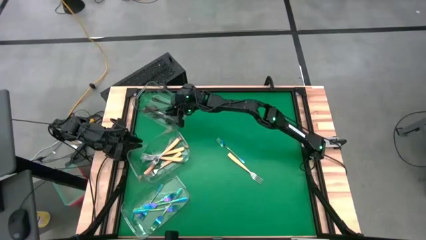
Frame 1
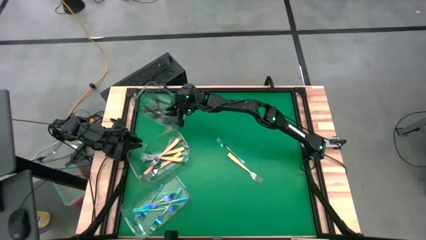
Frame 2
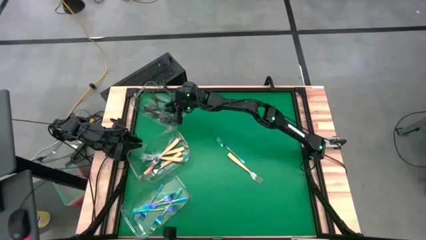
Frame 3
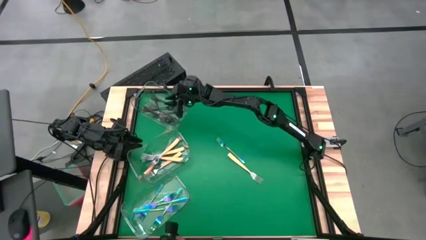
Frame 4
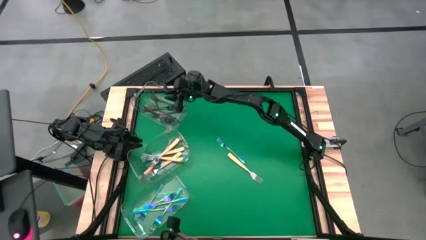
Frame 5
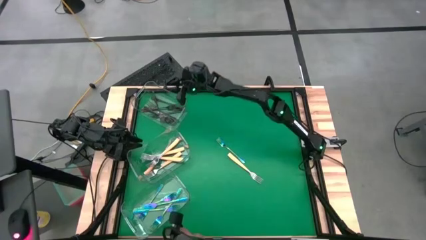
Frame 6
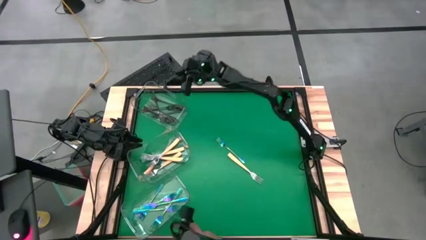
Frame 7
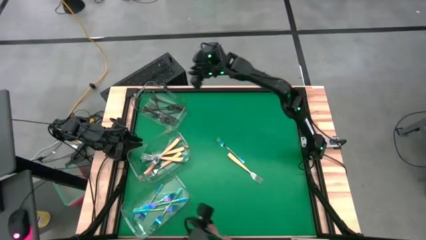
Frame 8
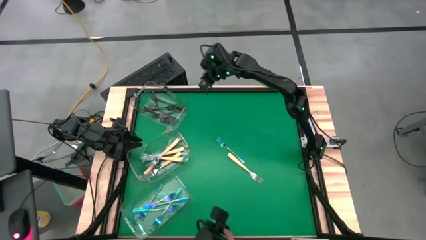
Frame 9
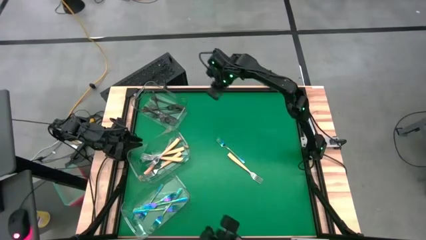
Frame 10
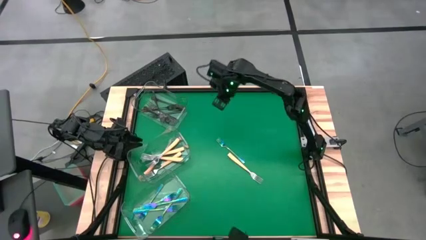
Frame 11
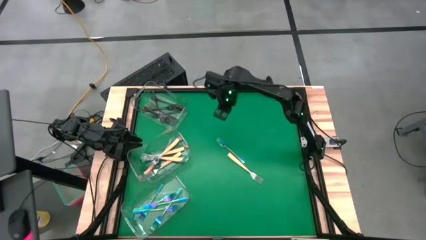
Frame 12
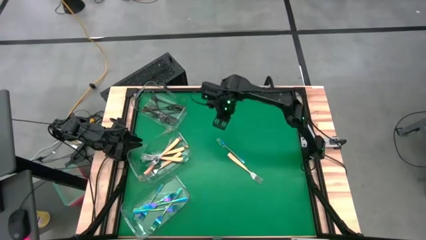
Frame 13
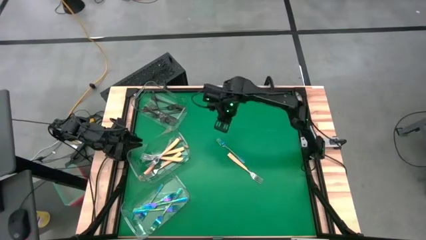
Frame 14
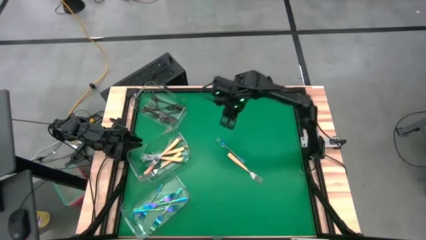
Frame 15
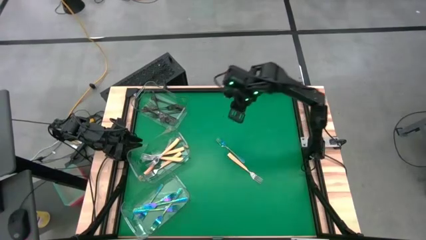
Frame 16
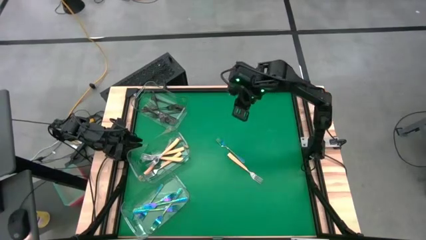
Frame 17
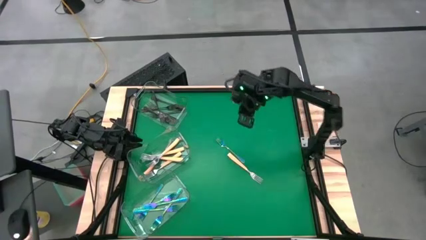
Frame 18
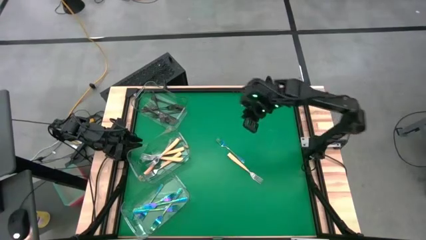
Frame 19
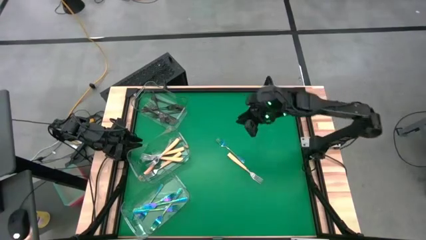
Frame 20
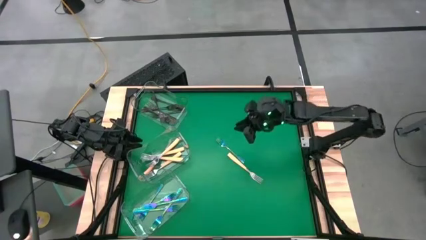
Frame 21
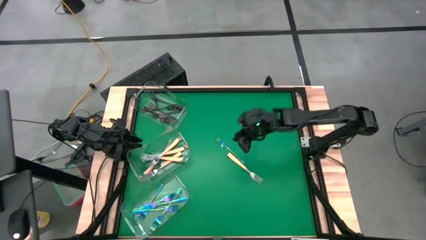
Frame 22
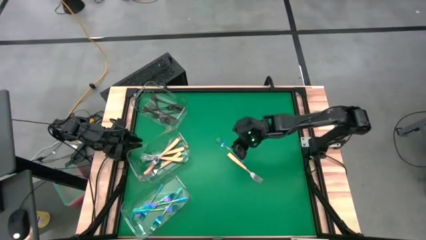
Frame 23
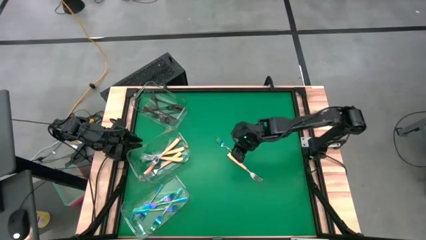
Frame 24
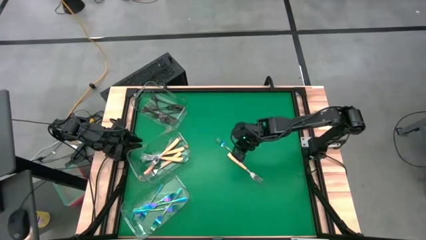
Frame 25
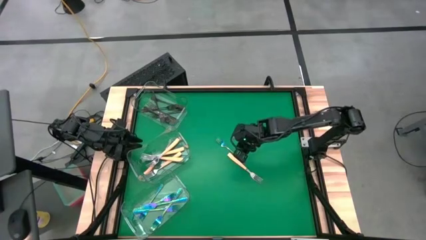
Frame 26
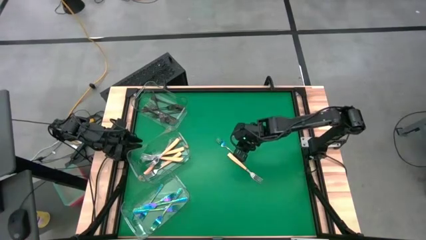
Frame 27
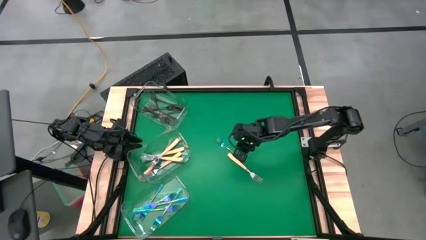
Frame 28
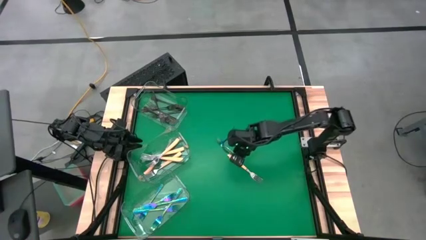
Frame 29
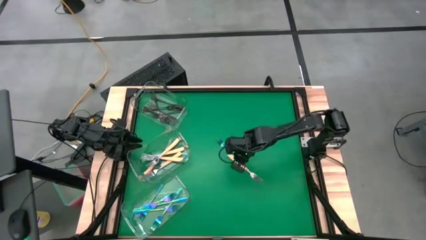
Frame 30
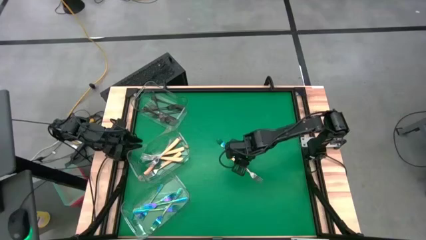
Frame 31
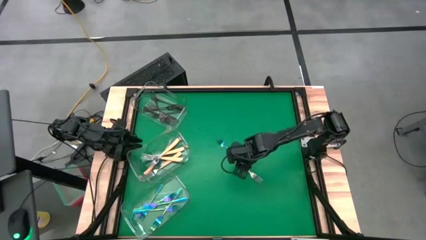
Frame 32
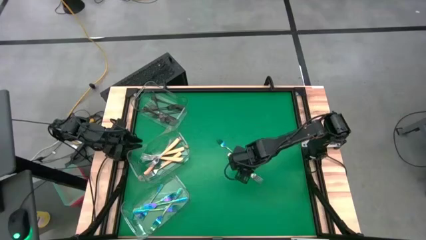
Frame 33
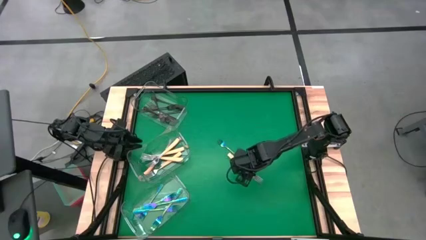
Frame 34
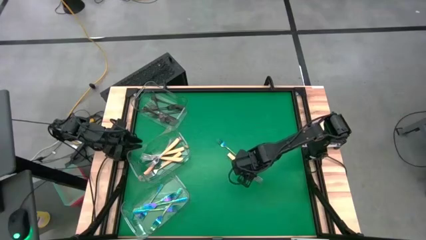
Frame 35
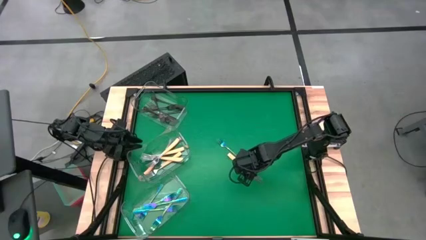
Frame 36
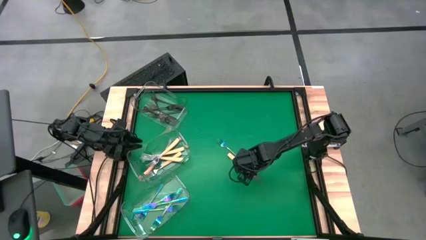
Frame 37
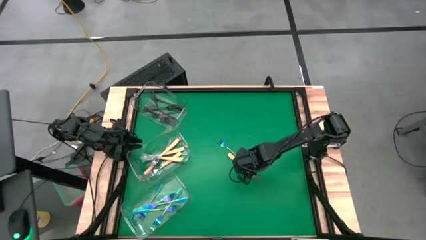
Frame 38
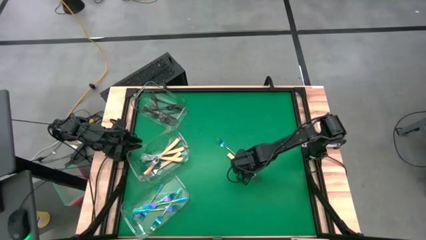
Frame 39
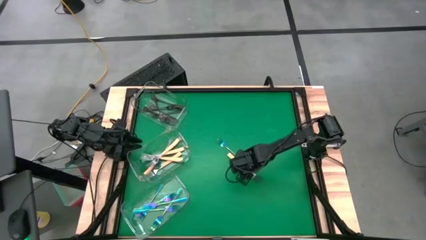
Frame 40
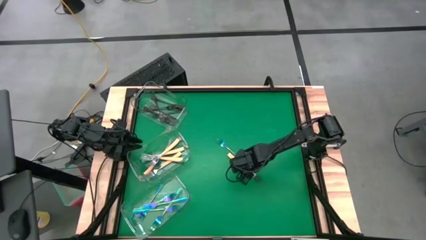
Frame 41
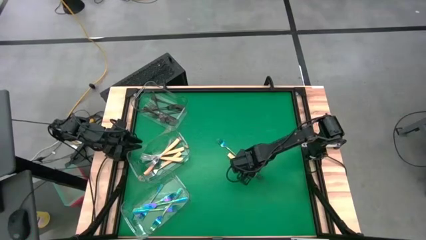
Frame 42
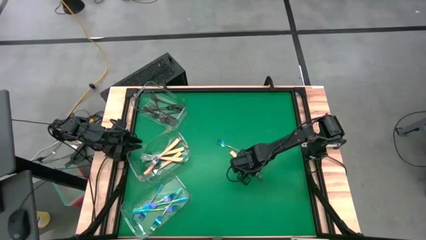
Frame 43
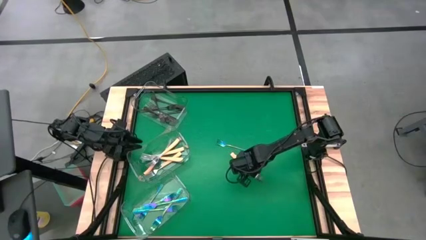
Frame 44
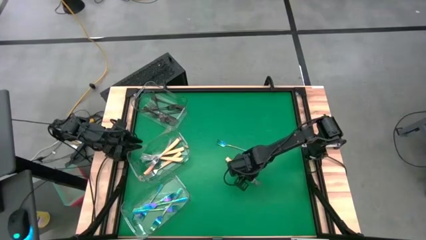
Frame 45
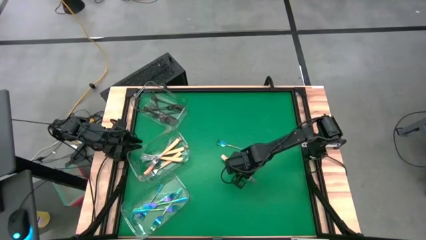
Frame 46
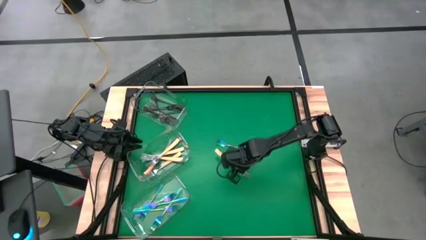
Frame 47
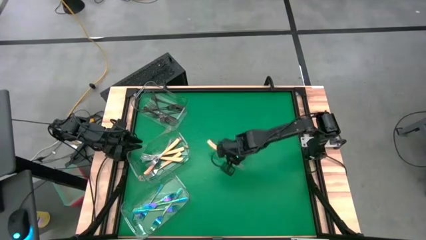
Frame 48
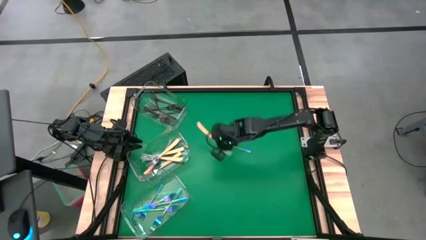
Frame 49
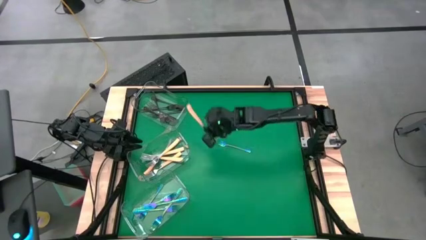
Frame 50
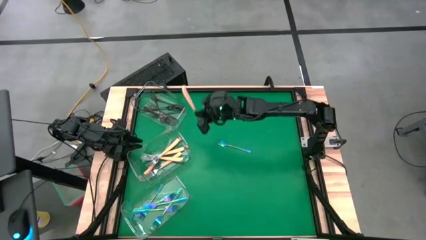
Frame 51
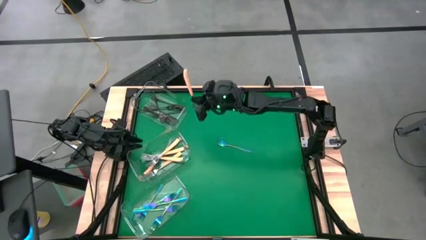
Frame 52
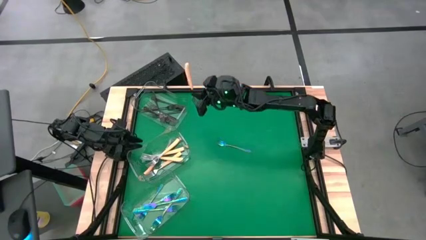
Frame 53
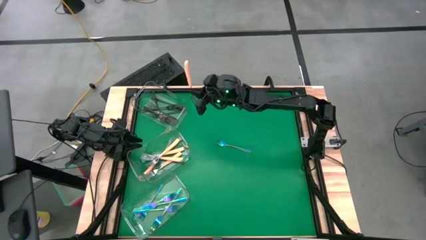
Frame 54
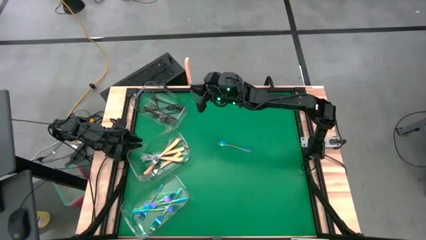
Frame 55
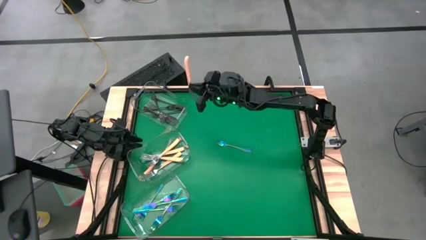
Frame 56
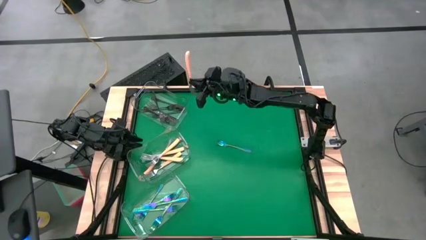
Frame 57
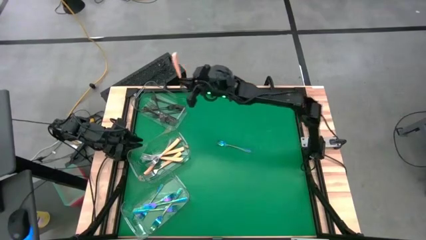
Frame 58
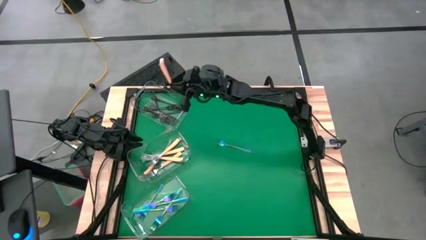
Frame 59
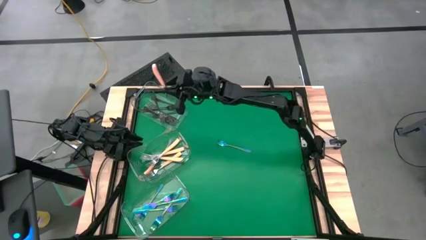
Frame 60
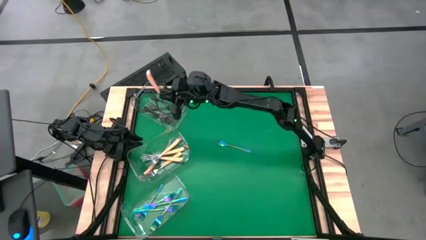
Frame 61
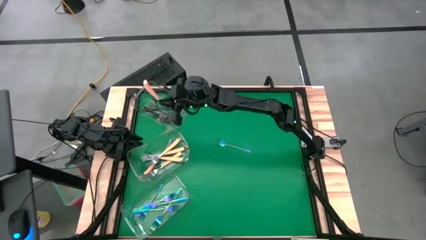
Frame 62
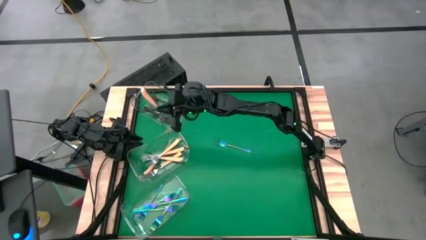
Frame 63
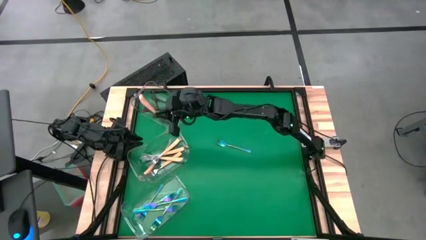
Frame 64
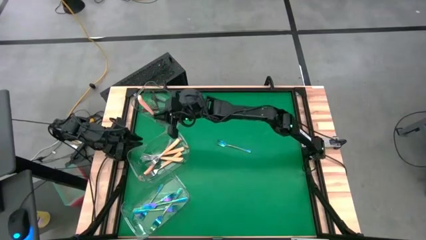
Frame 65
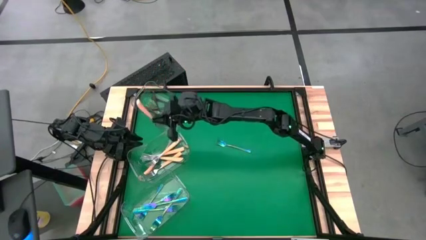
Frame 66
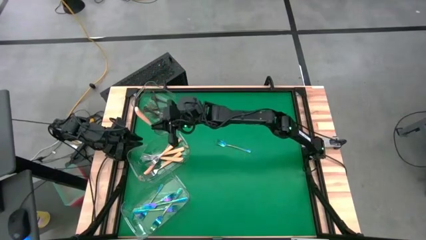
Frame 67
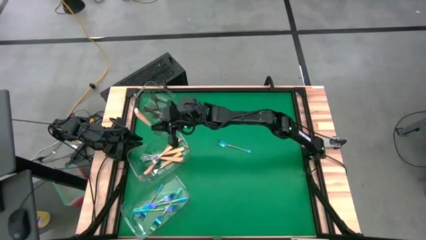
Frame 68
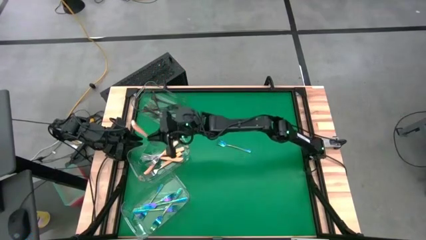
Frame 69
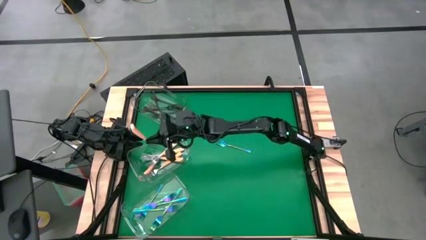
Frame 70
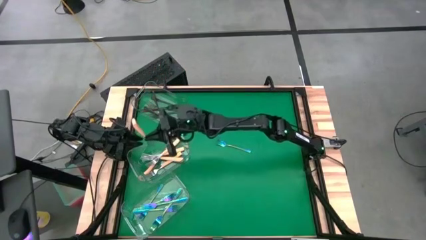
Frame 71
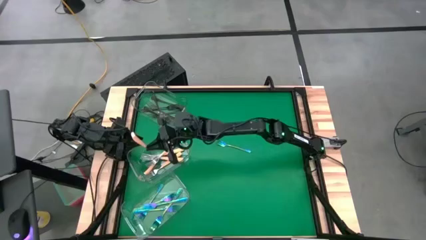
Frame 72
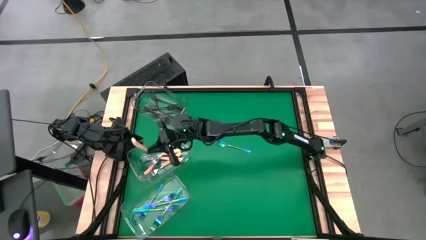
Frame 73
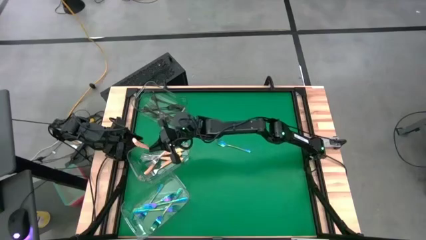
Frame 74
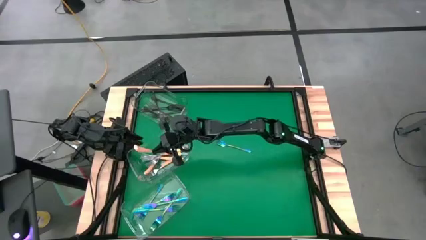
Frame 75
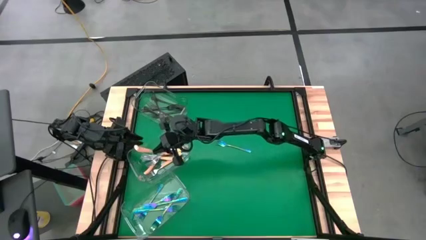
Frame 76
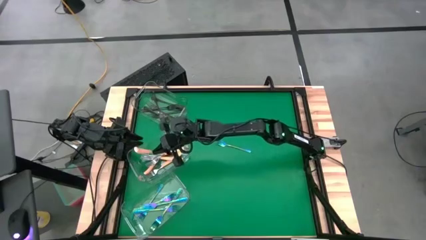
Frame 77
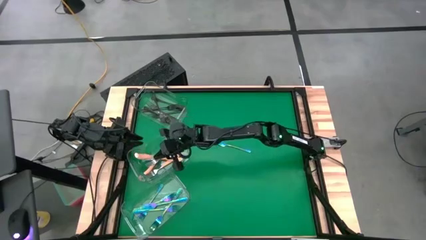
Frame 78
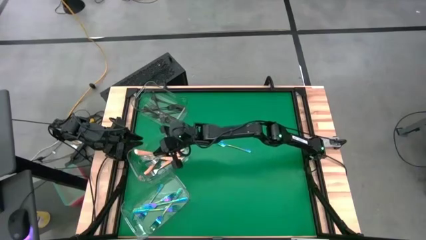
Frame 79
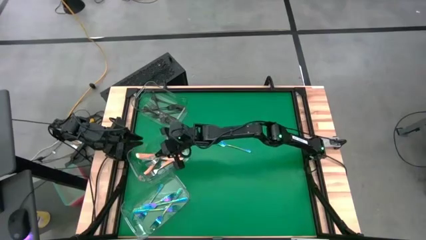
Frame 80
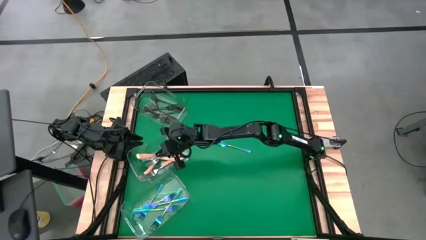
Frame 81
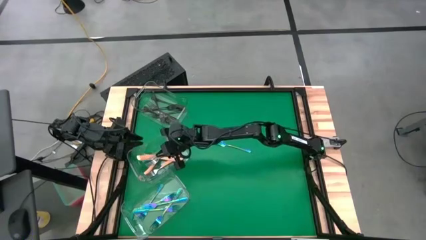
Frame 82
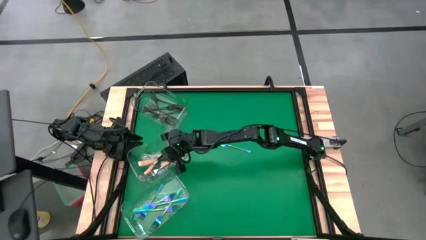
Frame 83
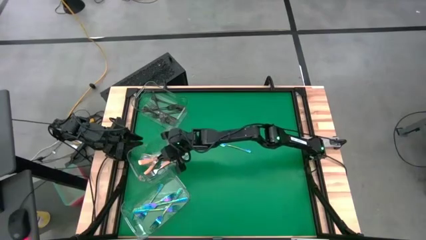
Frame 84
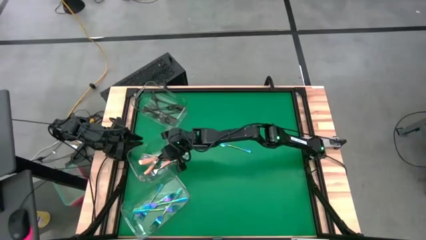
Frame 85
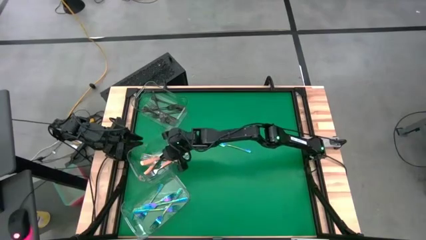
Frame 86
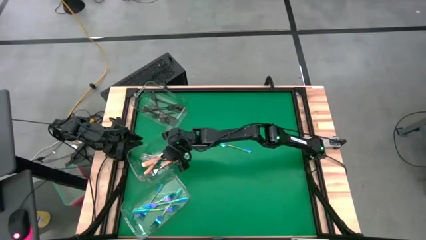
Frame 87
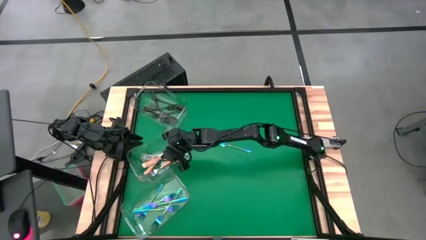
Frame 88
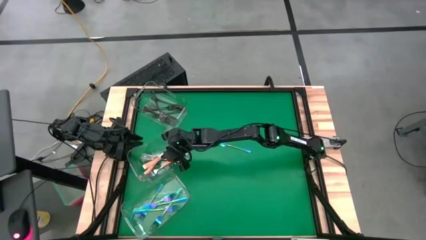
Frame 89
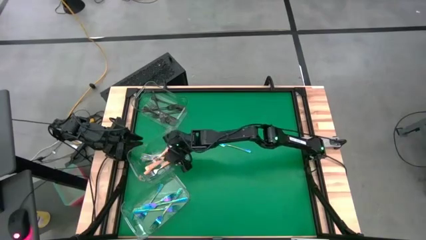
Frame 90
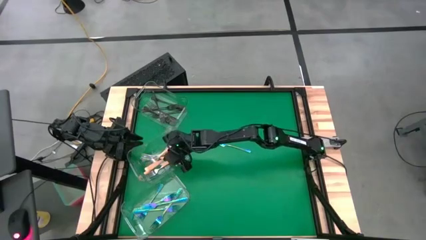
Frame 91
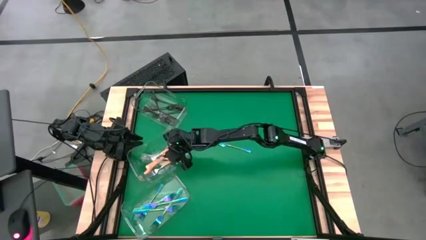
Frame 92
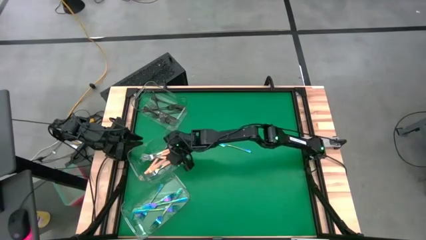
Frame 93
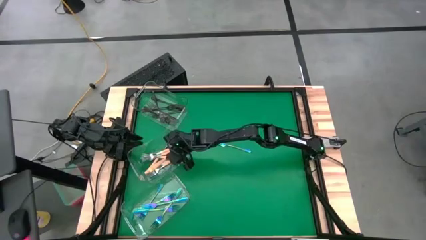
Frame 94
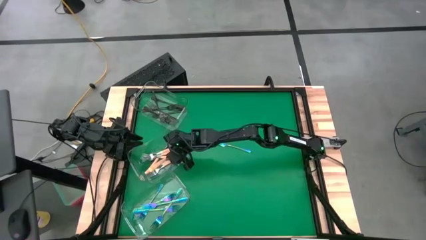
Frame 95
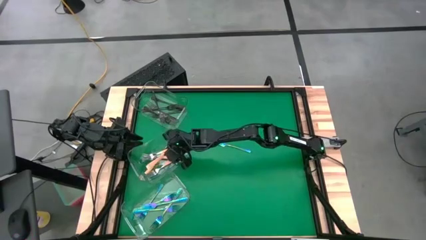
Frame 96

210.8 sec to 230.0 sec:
Task: Sort silverware by color (type)
Put the orange fork into the middle transparent bin
